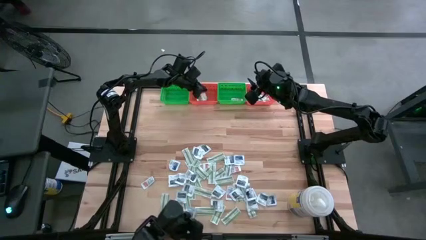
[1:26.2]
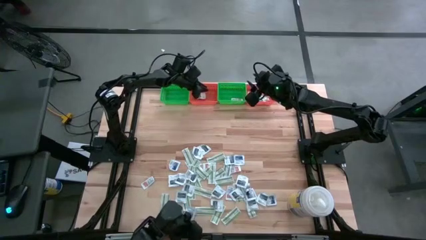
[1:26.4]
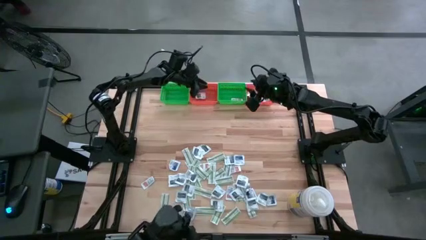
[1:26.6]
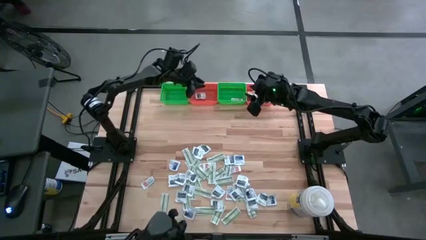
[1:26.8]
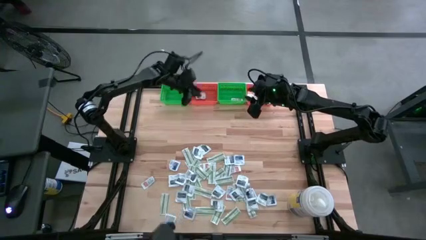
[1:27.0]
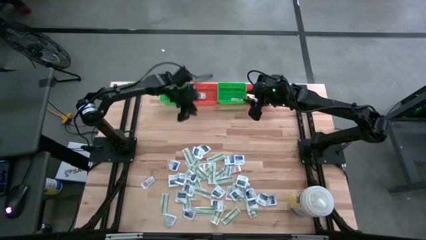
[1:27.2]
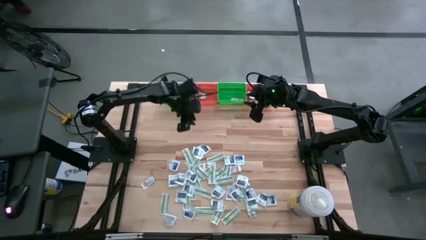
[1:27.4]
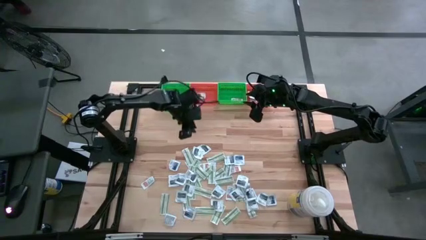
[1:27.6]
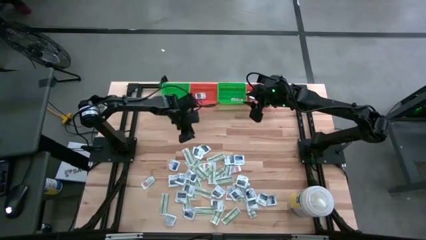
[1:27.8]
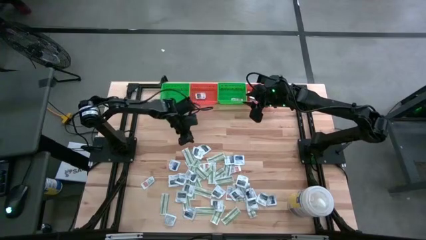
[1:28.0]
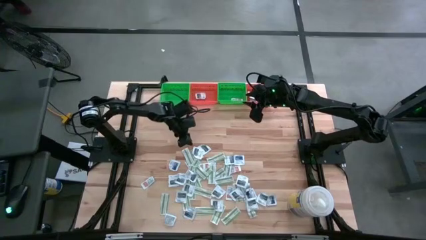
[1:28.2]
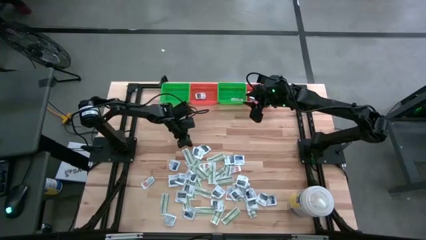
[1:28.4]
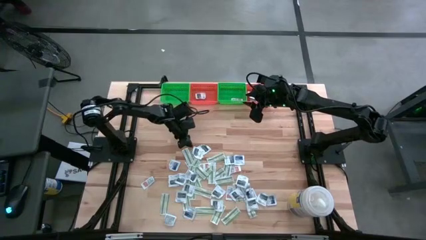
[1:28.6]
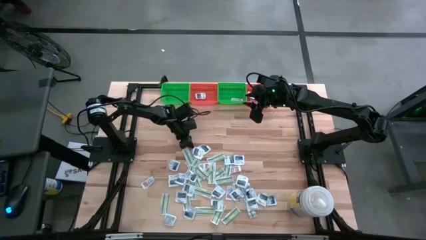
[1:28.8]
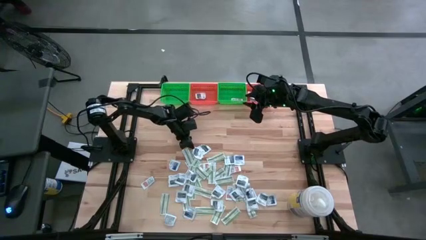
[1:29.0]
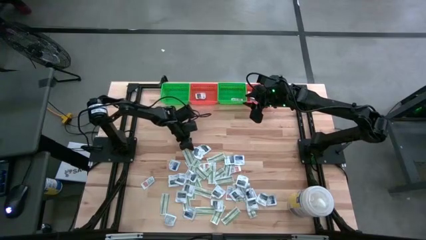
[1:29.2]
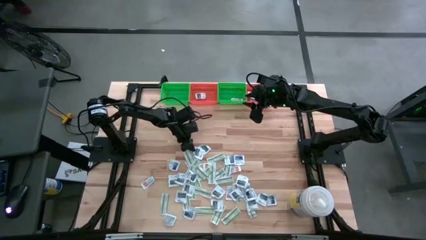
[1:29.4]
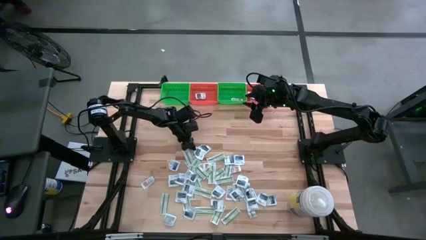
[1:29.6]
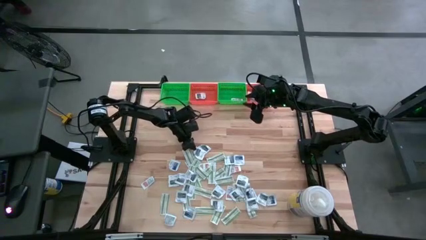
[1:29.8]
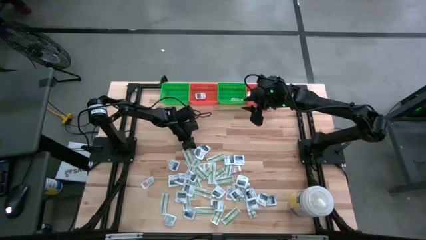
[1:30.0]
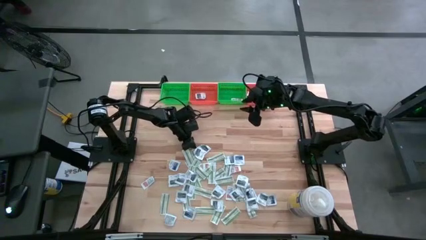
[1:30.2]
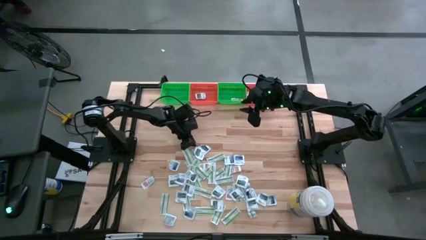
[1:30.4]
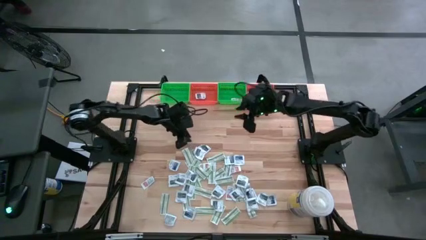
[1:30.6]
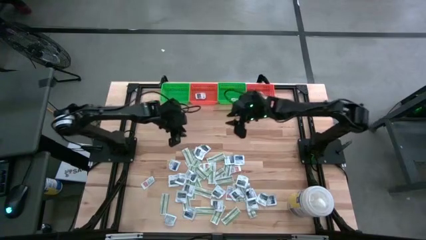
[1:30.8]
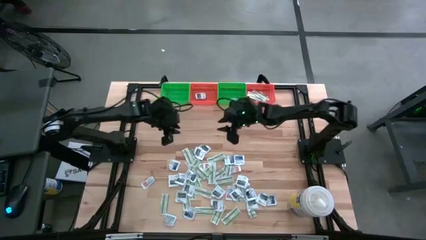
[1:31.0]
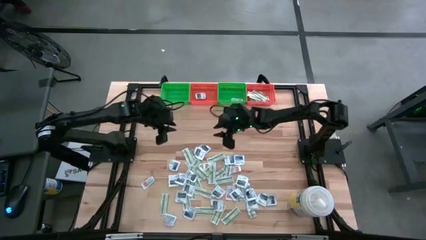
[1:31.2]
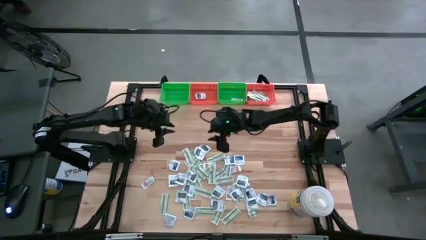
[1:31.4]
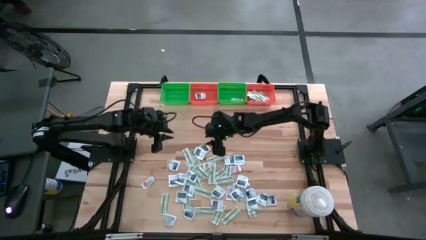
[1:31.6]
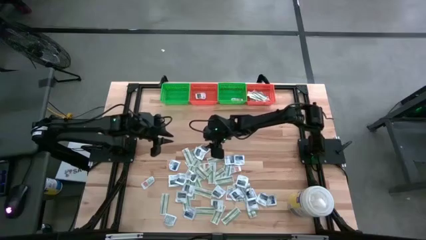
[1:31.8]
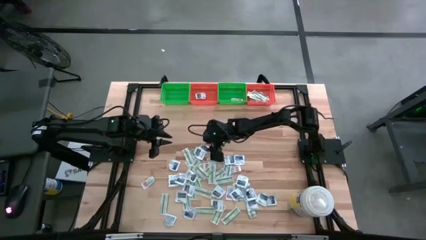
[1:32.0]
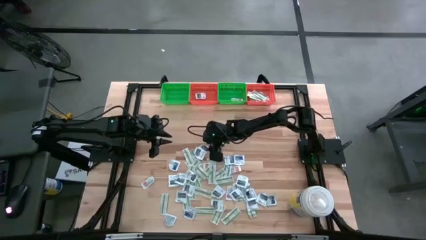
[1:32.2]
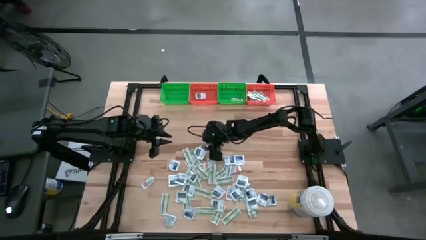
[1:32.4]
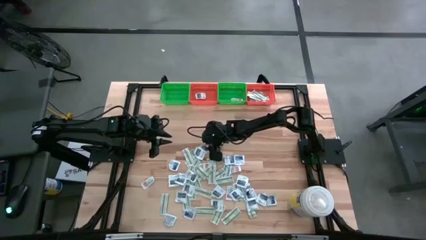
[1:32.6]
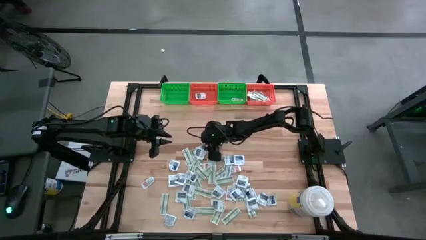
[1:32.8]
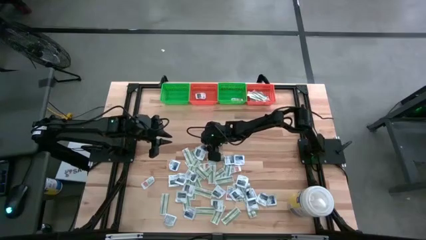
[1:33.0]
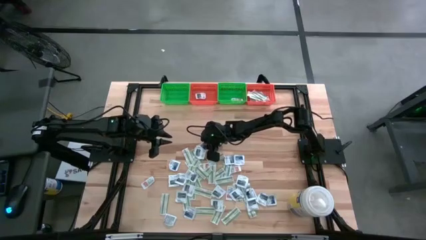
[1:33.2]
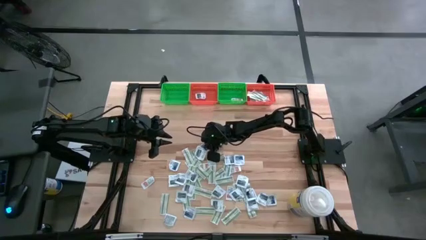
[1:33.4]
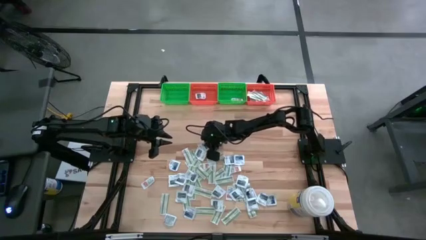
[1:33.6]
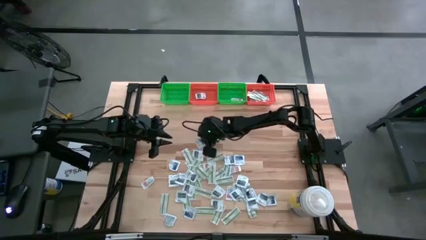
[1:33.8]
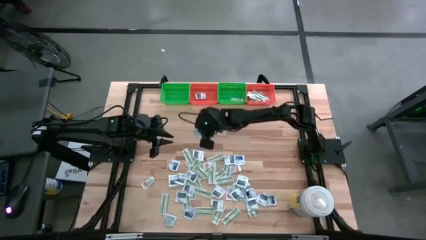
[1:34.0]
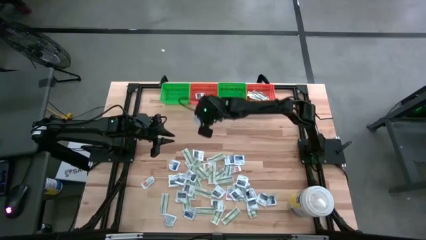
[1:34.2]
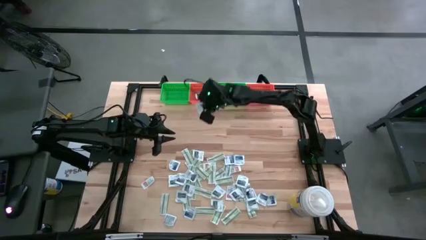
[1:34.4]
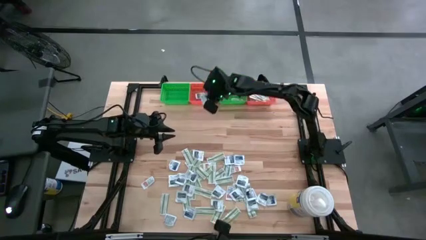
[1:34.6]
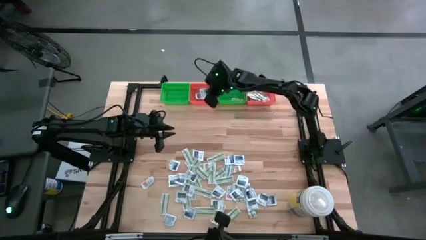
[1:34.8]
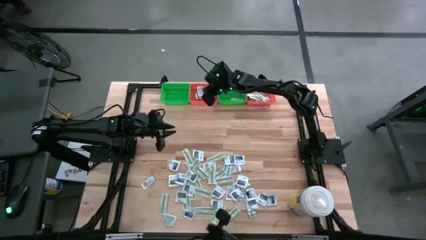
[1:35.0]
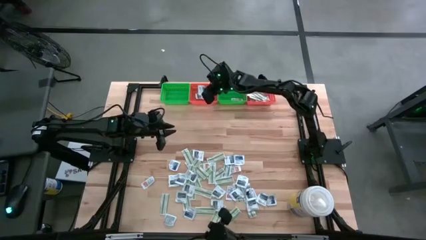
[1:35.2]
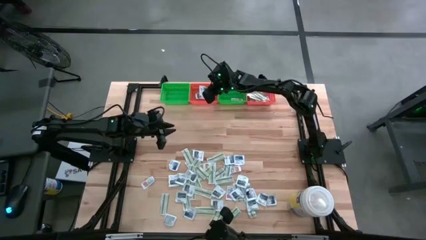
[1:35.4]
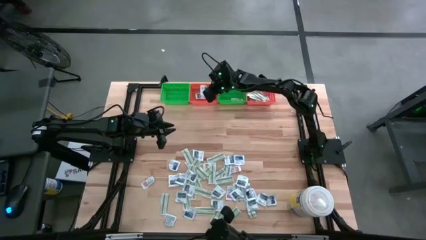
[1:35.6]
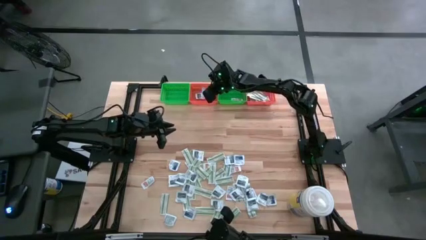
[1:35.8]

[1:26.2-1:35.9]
Task: Pick & Place First Aid Supplies
Put the gray towelette pack in the left orange bin

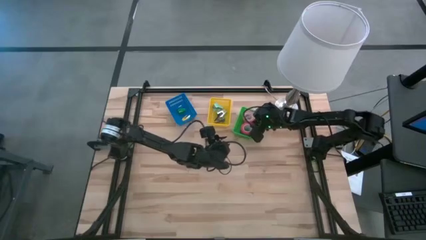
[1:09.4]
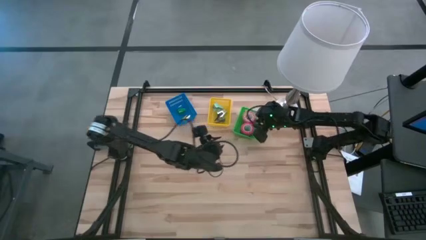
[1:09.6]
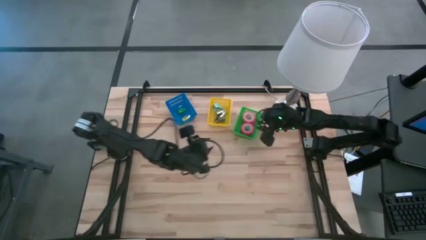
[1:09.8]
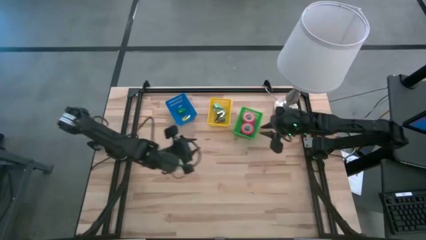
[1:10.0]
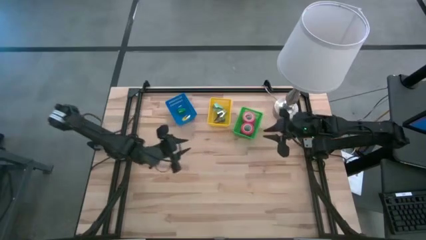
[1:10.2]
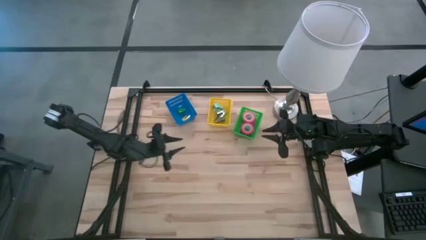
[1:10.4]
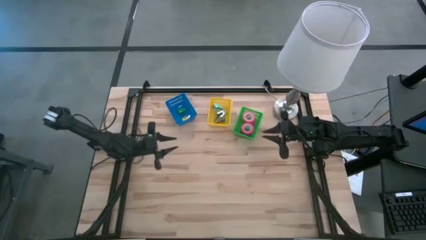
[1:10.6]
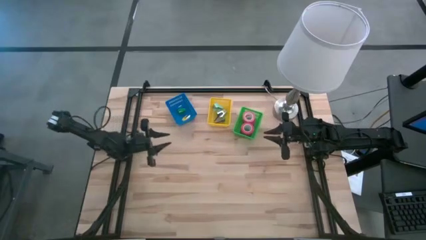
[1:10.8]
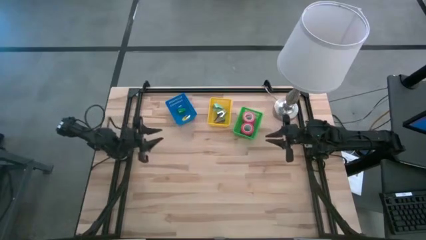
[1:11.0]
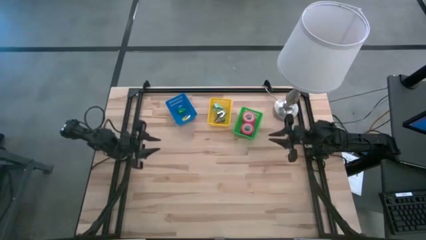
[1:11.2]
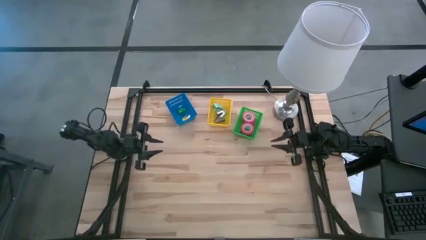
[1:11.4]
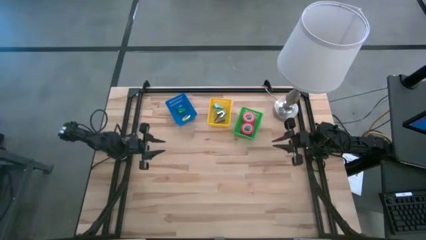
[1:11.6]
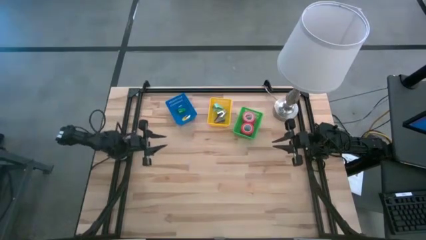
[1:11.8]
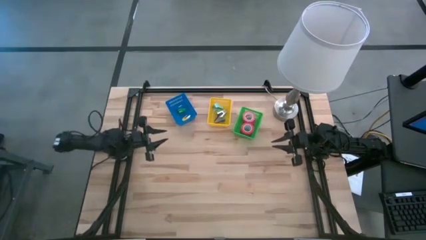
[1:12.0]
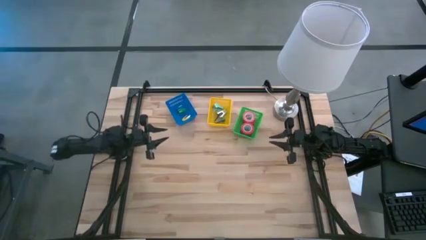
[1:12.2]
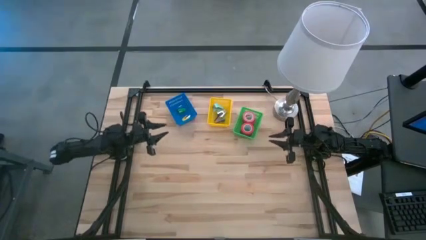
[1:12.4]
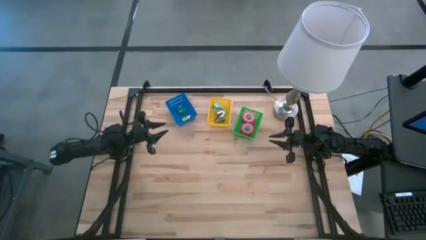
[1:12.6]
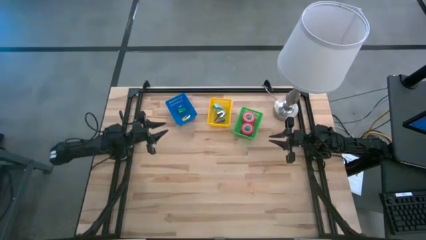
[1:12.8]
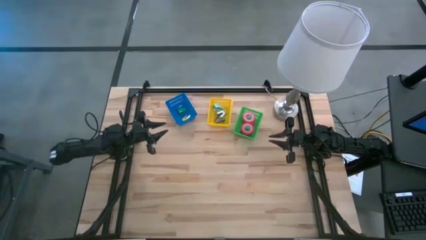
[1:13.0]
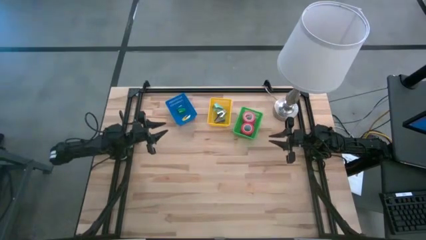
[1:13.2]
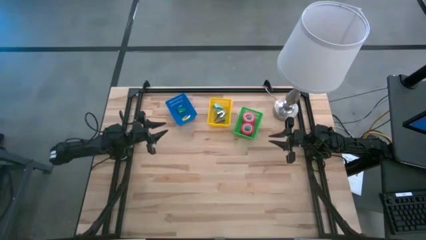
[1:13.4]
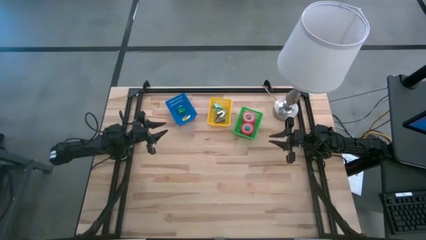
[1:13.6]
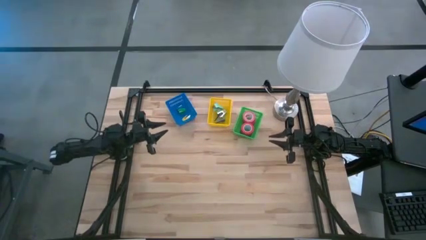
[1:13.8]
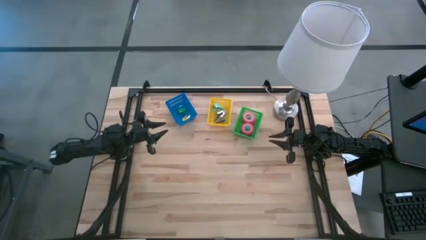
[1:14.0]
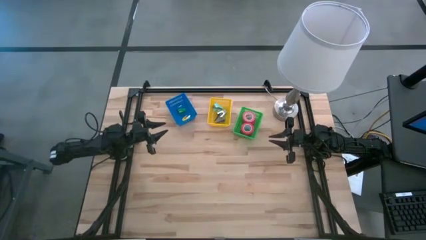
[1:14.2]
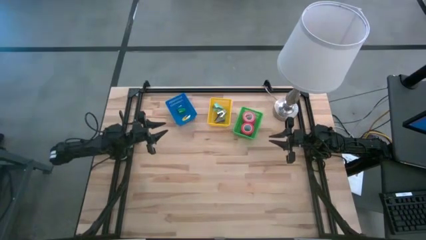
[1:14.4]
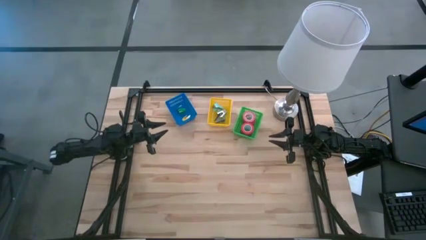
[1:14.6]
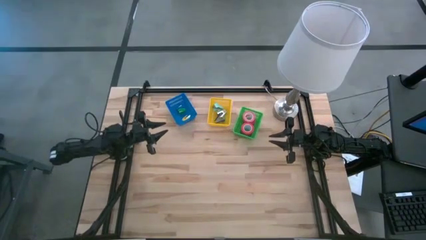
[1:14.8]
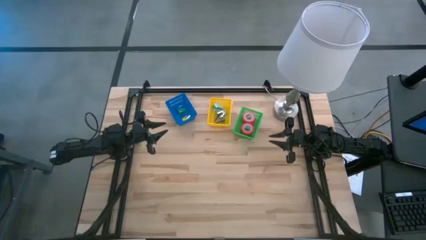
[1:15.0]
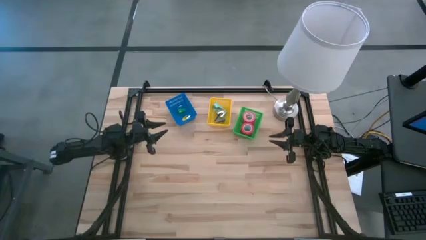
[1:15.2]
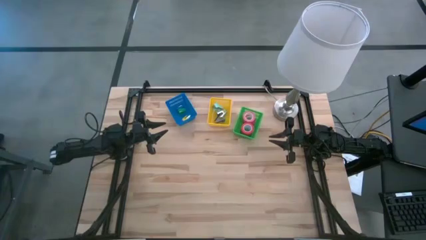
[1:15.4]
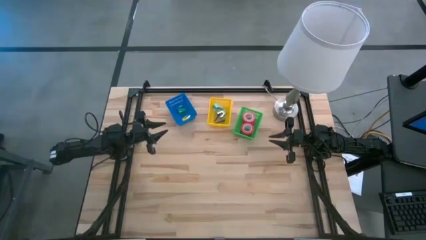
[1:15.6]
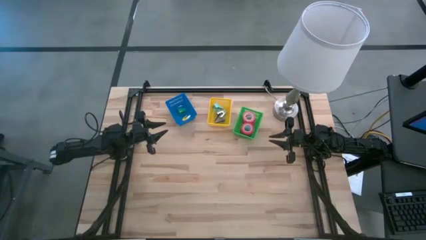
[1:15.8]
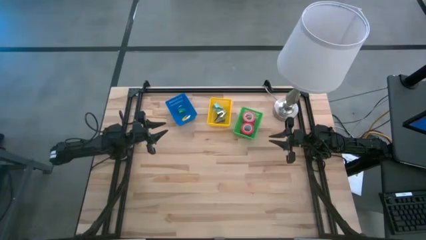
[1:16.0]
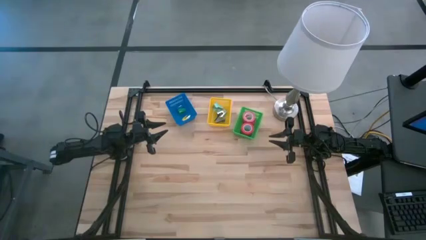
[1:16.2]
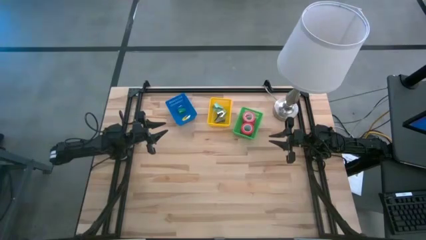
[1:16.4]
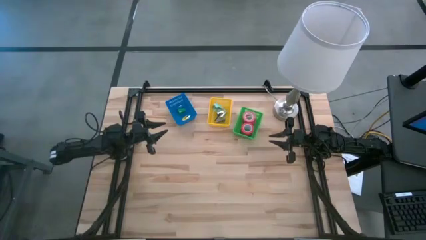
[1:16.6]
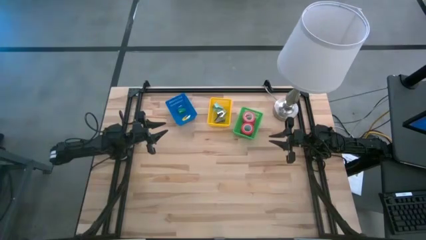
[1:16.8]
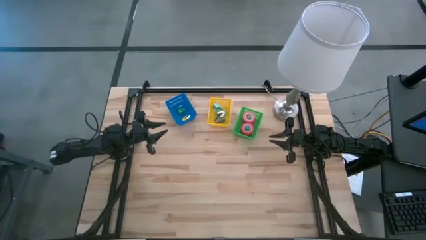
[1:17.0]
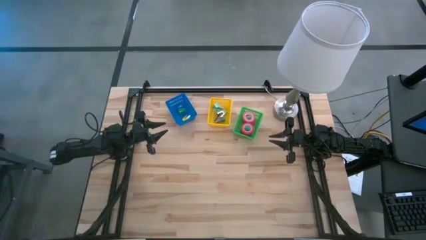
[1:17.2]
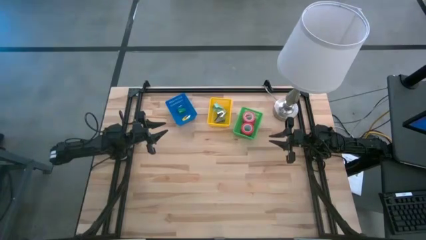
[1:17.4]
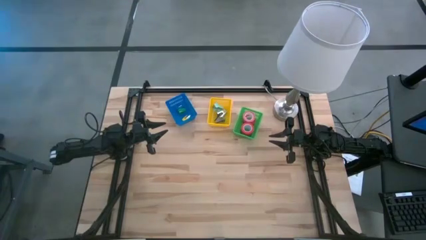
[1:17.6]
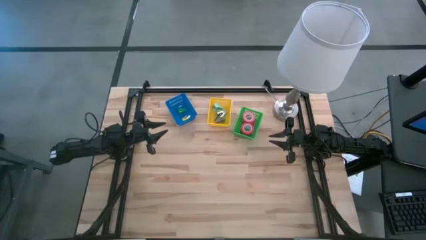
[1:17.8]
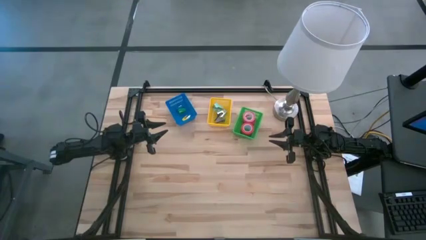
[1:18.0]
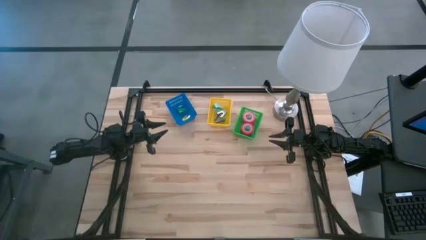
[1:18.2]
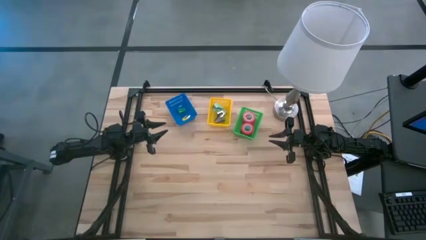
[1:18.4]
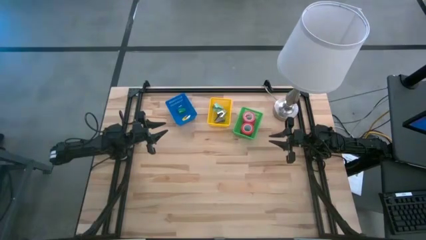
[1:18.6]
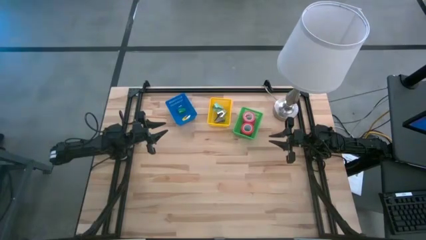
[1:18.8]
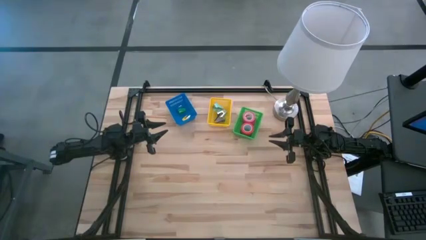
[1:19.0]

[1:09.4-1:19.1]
Task: Pick and place Stapler, Stapler remover, tape
Return to Home Position
